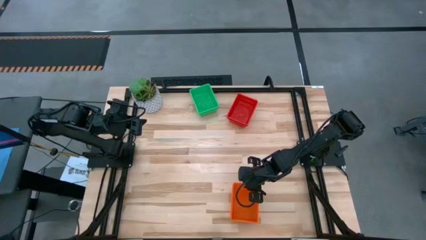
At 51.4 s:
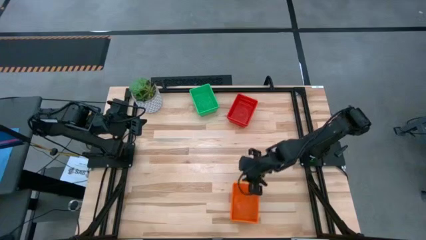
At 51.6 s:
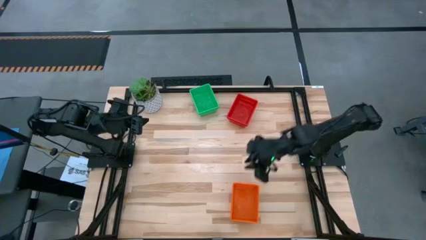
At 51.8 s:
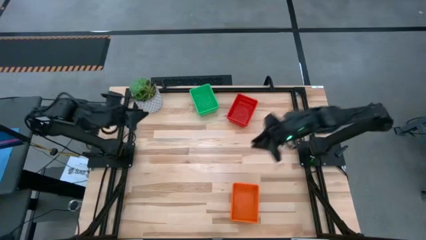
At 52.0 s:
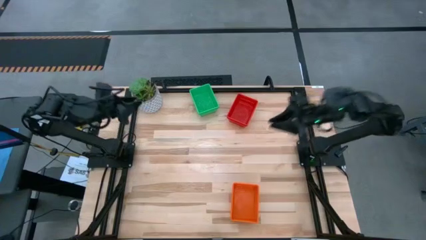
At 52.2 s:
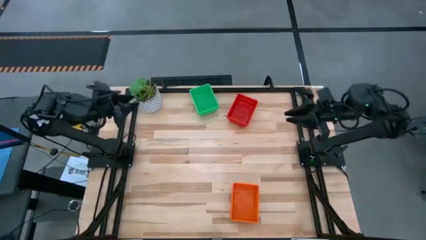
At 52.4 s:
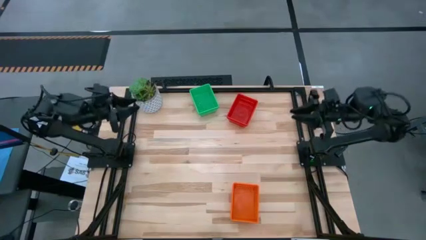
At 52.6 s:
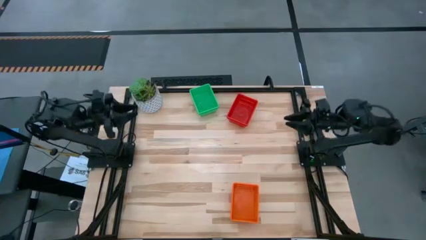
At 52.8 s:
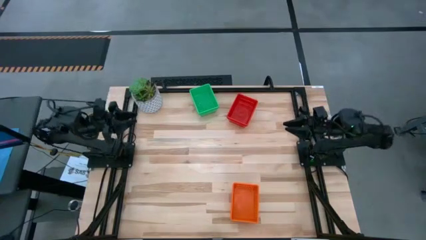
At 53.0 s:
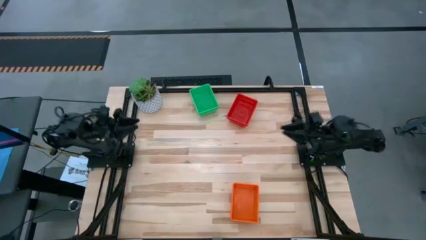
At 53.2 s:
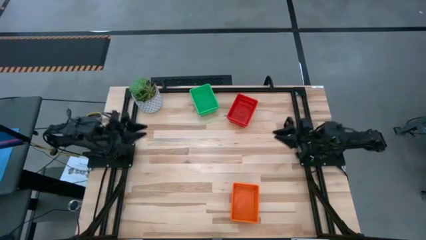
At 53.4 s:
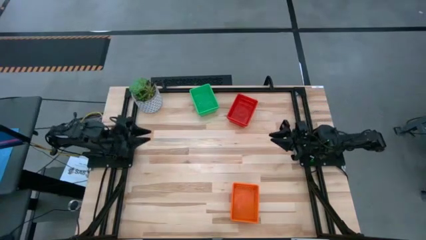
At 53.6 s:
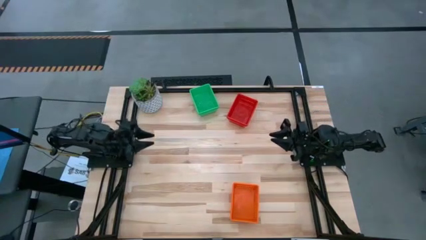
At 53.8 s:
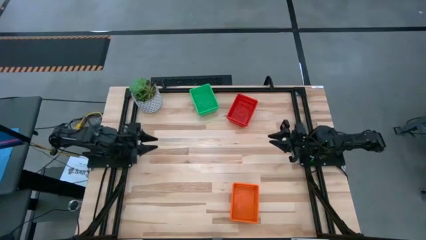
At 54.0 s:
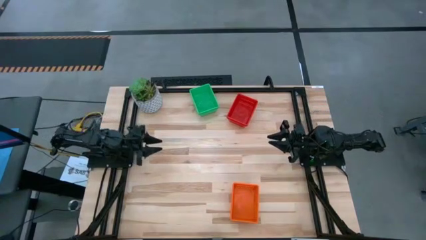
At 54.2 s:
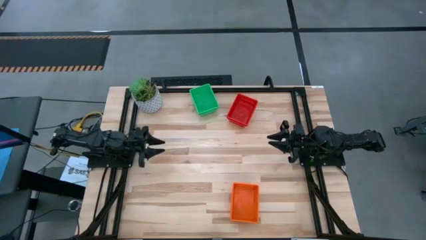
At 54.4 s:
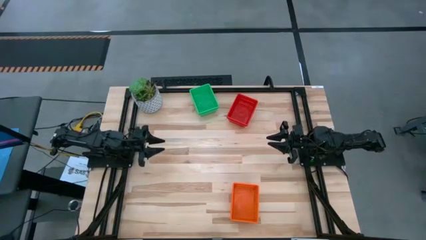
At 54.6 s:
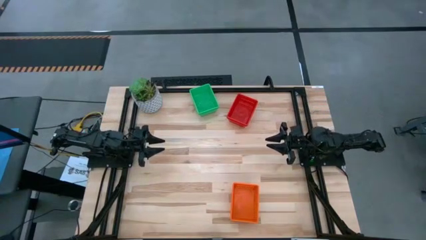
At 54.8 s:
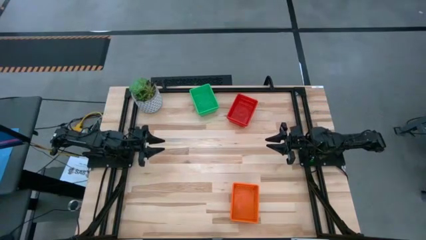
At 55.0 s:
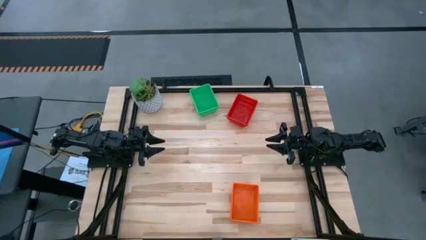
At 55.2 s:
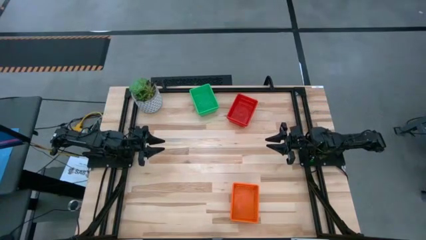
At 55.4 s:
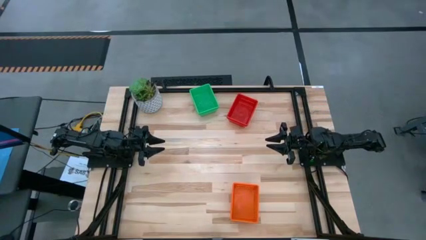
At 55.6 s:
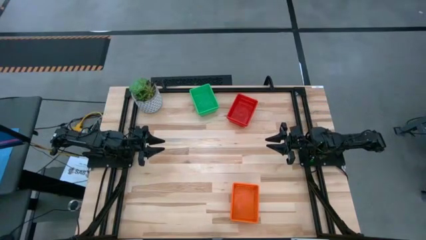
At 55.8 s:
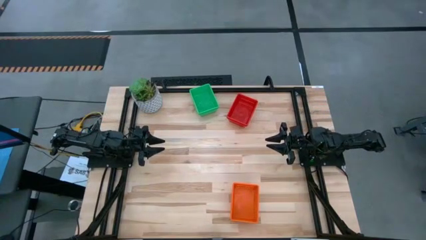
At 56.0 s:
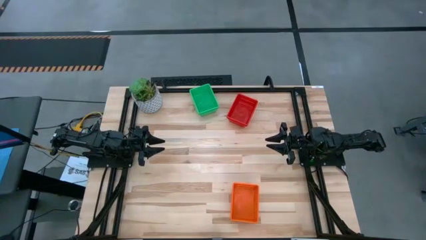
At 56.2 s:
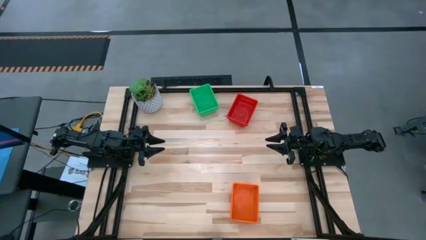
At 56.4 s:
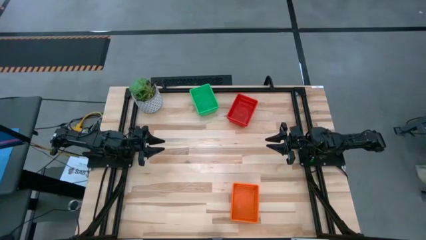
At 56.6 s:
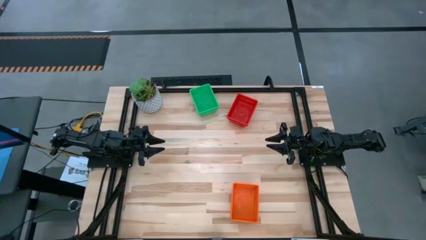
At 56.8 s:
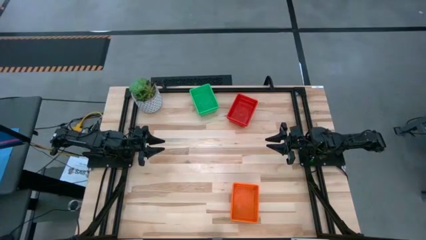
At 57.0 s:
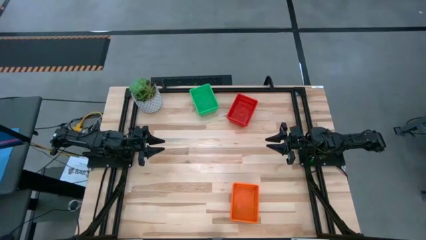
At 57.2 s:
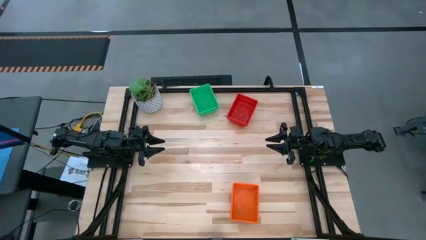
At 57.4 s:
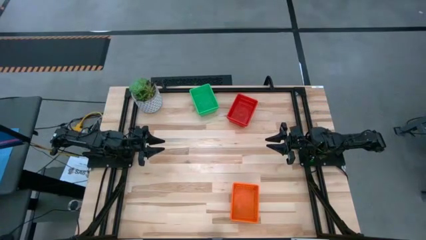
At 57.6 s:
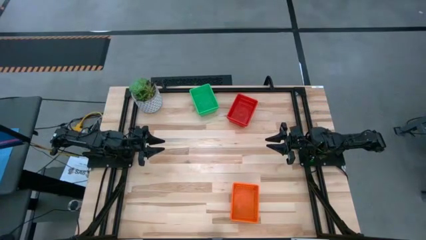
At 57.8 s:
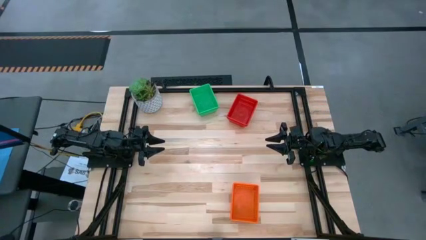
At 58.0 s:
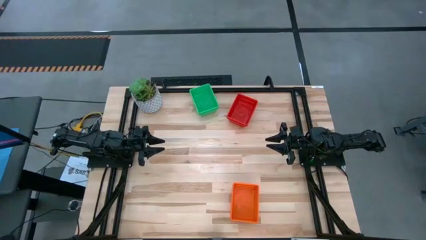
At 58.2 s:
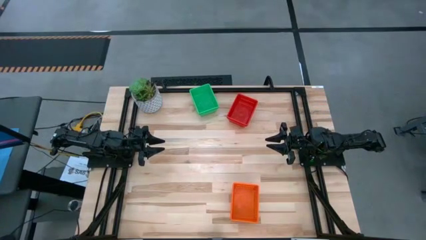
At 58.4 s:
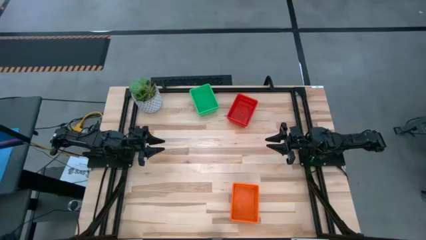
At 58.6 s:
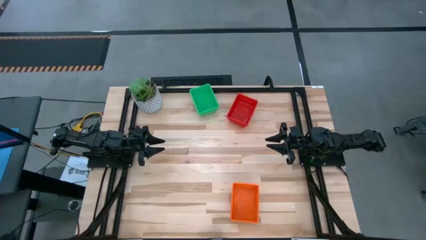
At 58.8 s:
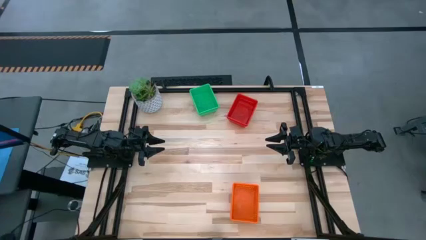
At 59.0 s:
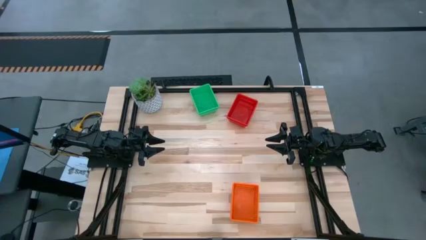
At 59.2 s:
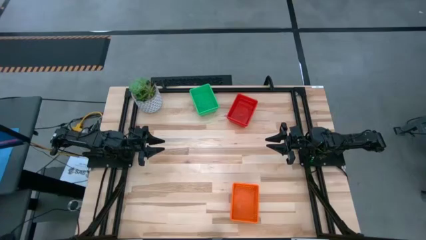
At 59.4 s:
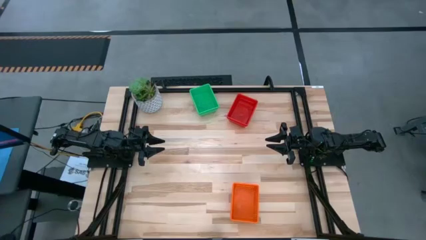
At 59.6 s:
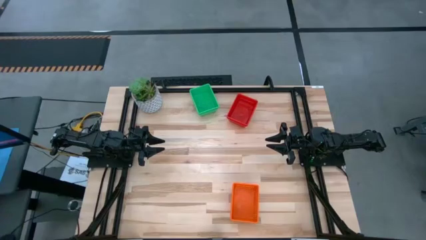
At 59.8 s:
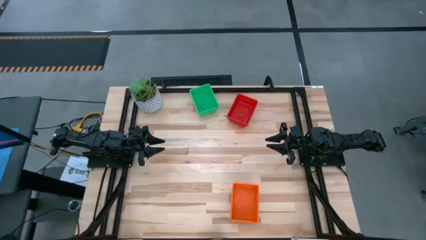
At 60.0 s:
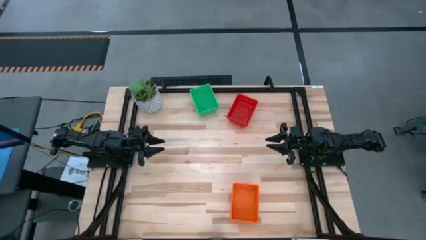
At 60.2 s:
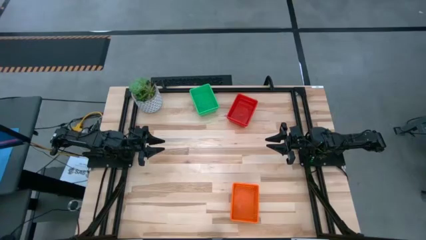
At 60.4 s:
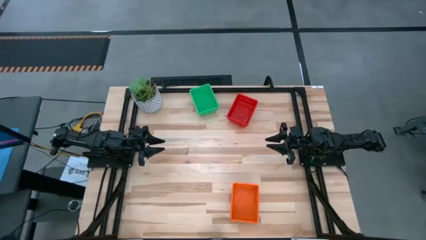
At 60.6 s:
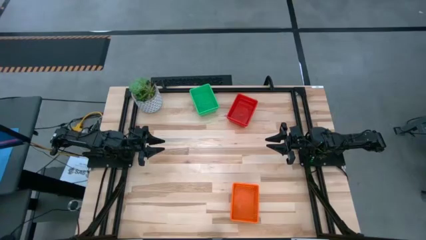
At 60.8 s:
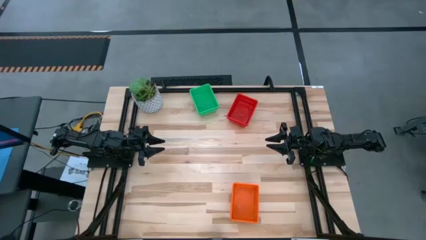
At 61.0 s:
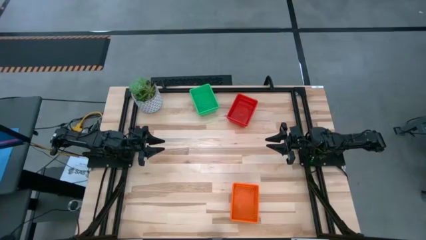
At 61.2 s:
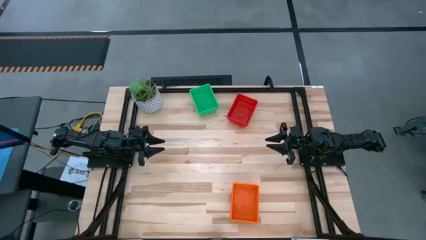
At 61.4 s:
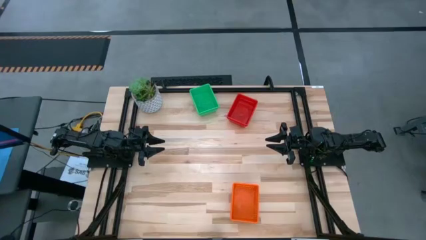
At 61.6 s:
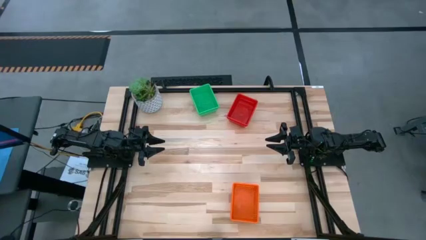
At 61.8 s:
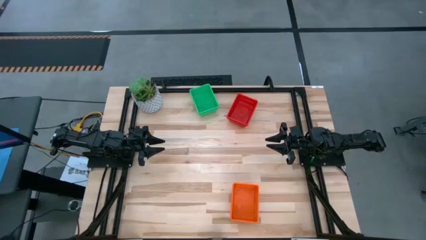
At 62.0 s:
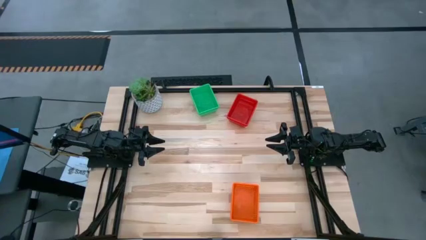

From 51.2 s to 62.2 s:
Return to Home Position

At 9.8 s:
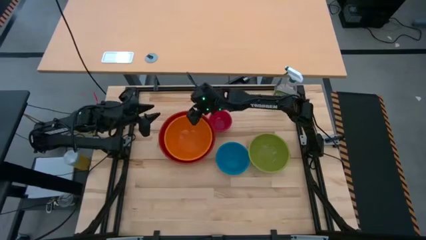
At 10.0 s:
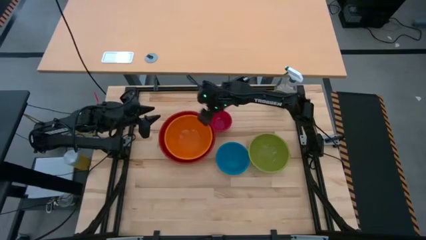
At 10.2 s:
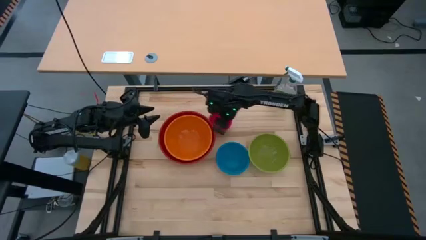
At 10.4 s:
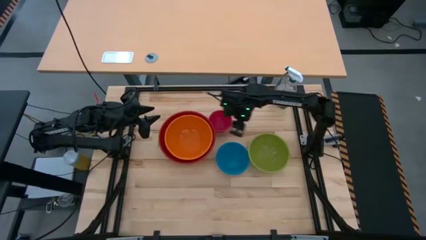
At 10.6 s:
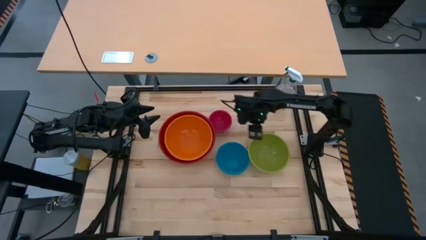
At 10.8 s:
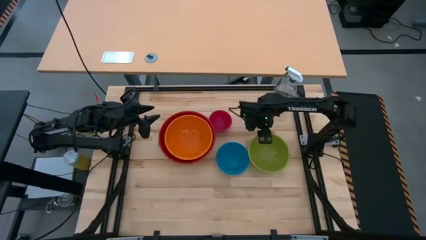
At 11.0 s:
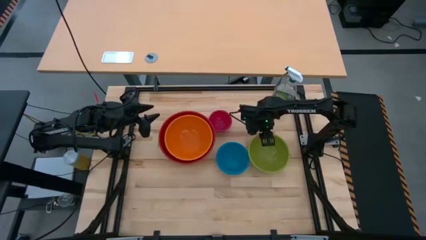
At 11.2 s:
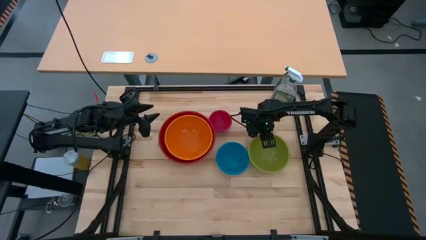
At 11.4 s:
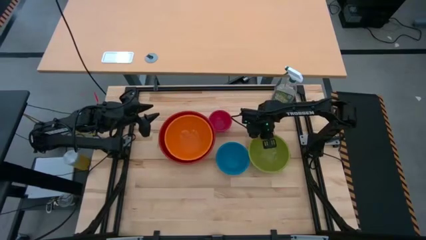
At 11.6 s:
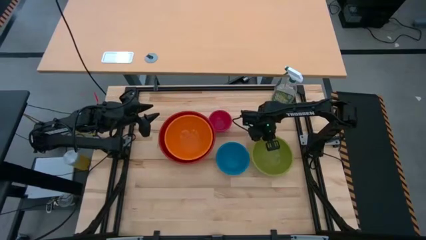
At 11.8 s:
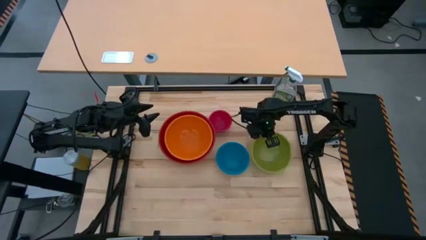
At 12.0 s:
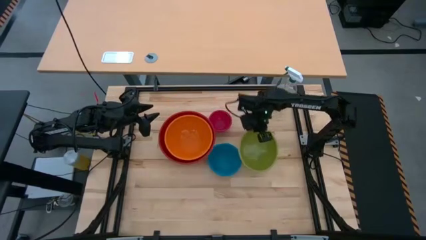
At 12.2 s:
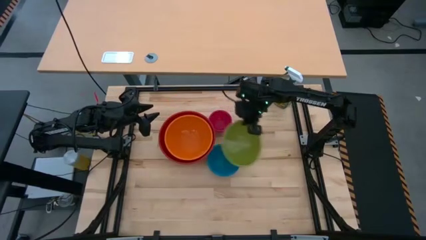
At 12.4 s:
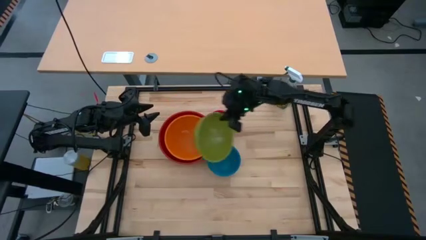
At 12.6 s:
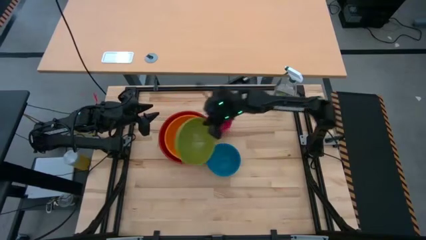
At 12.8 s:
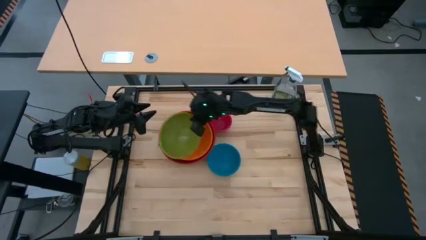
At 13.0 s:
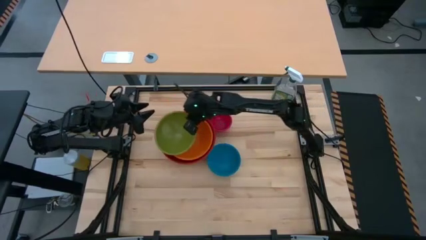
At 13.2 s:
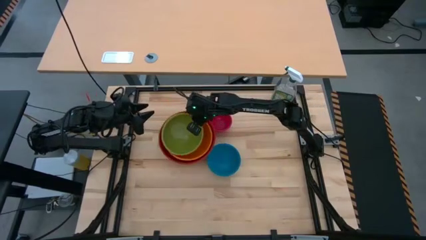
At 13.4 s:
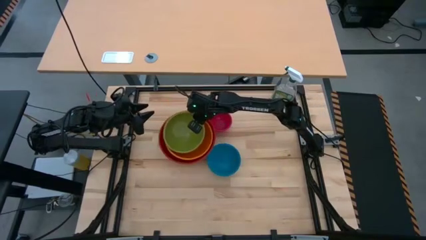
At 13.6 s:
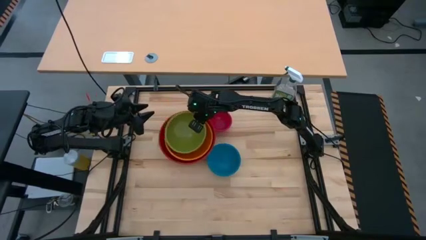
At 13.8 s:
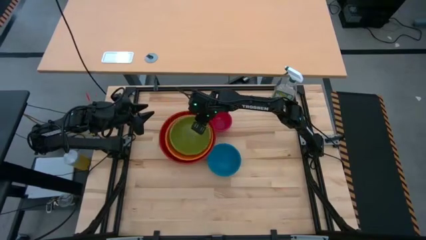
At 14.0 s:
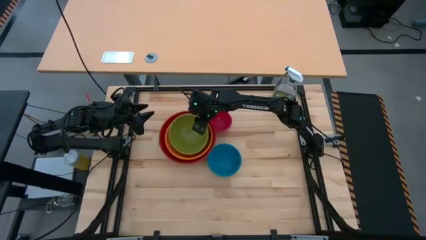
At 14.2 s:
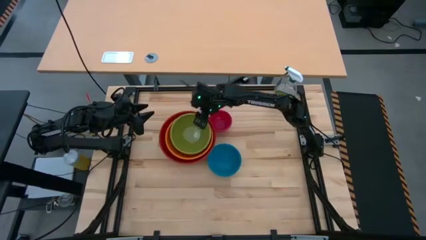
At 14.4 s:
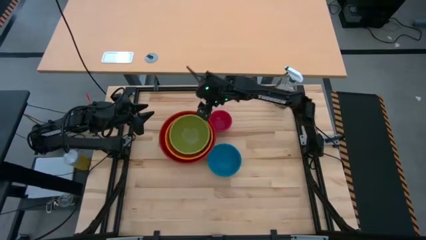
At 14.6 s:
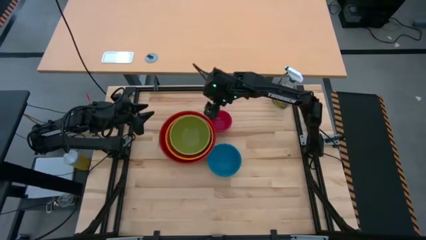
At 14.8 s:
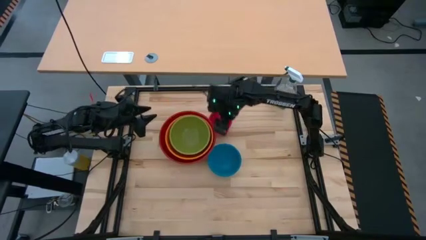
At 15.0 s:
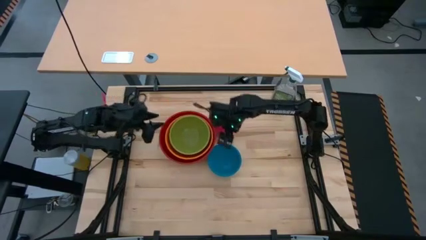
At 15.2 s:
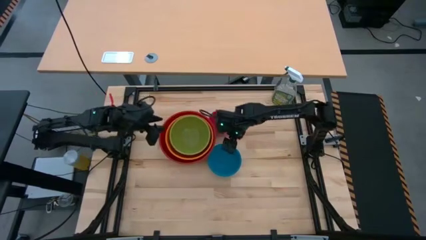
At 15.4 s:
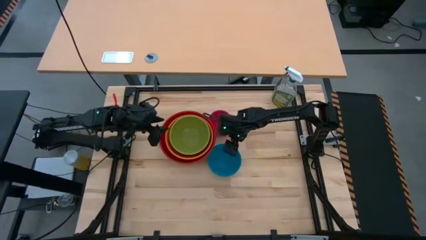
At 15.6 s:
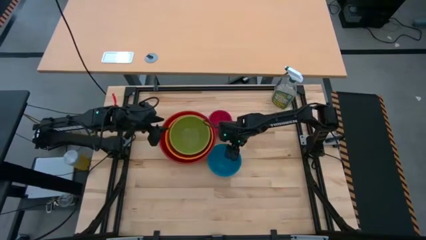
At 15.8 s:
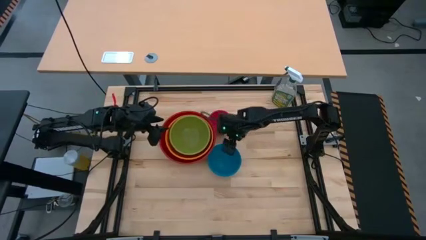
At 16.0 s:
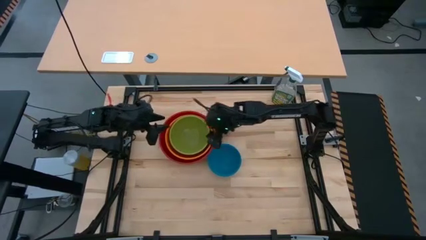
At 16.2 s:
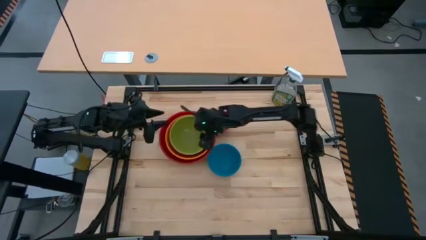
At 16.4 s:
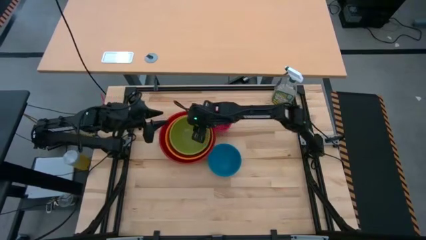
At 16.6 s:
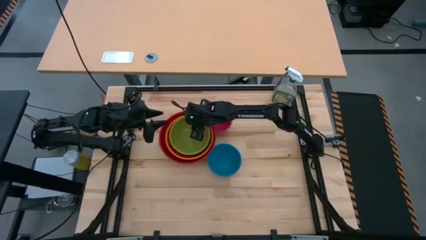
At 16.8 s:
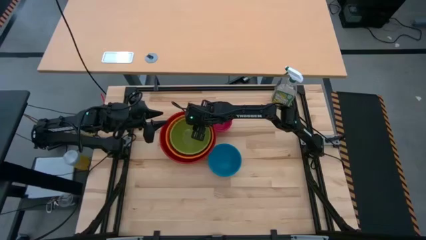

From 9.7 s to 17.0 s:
Stack the green bowl on top of the orange bowl
